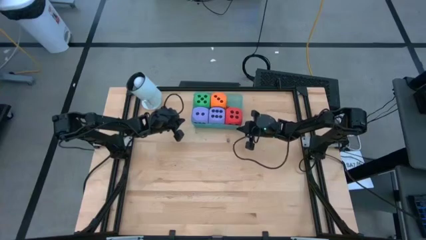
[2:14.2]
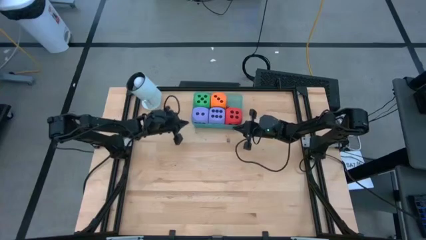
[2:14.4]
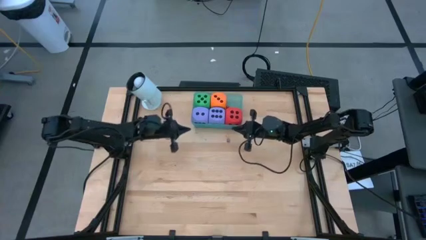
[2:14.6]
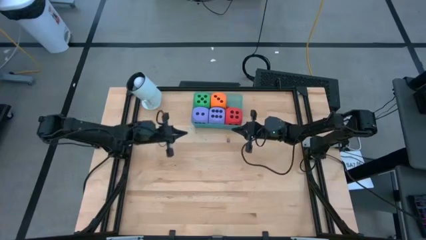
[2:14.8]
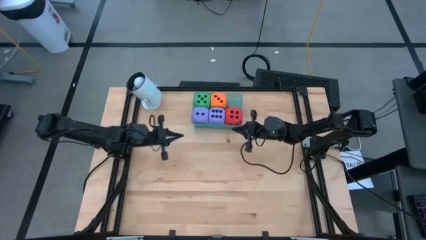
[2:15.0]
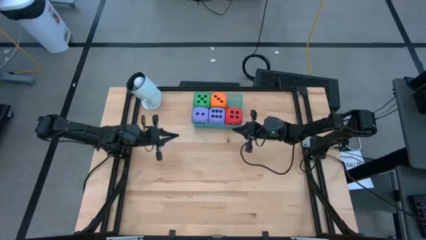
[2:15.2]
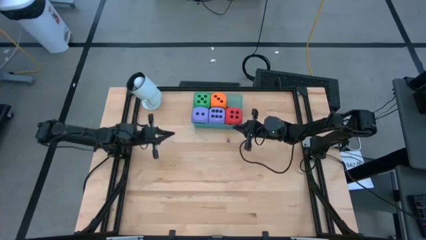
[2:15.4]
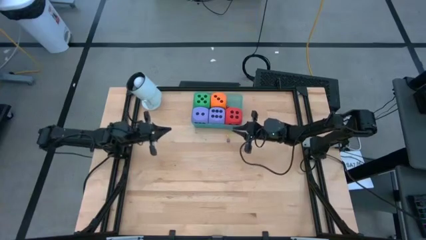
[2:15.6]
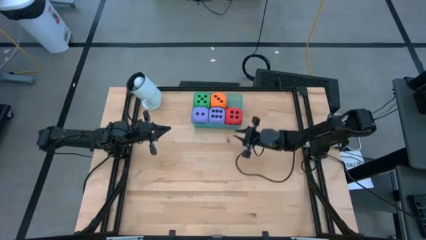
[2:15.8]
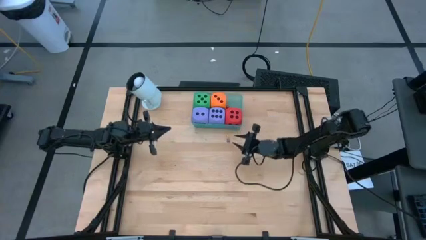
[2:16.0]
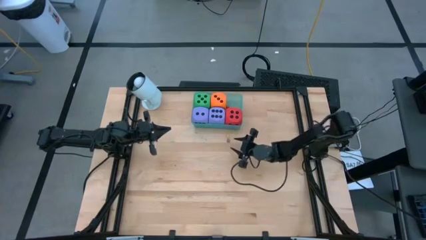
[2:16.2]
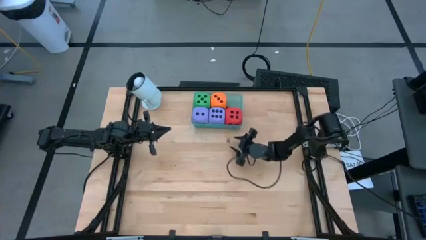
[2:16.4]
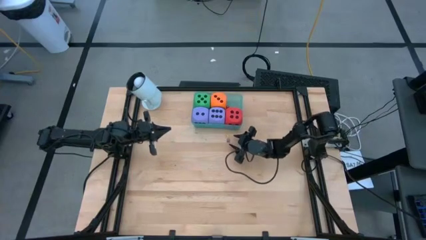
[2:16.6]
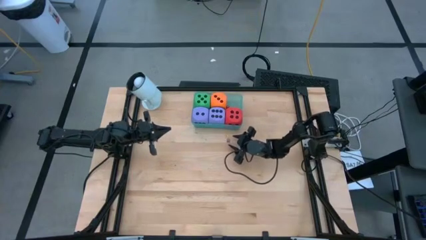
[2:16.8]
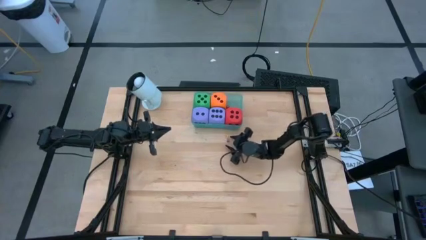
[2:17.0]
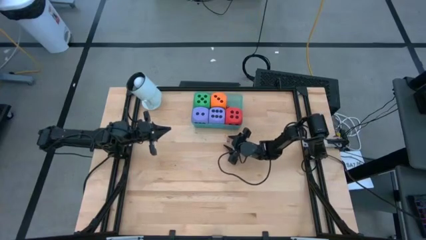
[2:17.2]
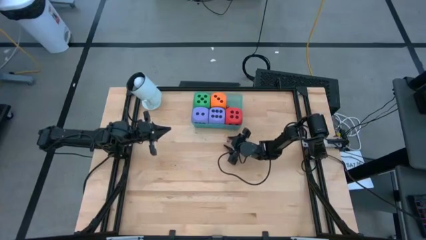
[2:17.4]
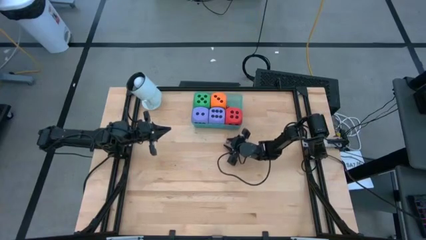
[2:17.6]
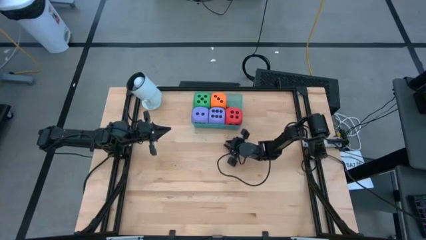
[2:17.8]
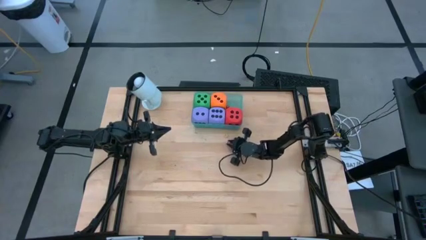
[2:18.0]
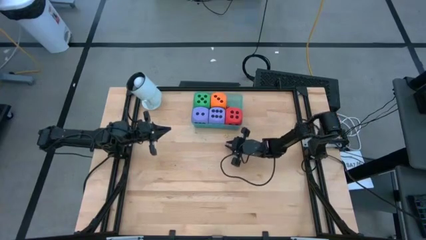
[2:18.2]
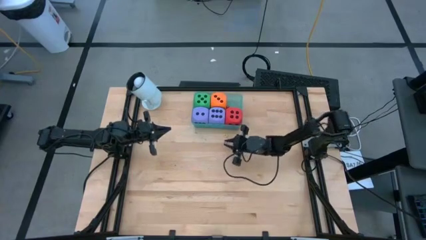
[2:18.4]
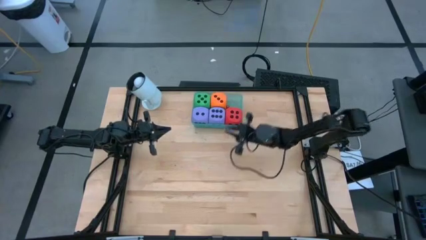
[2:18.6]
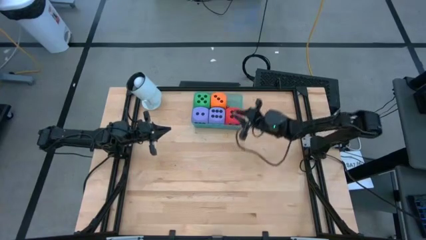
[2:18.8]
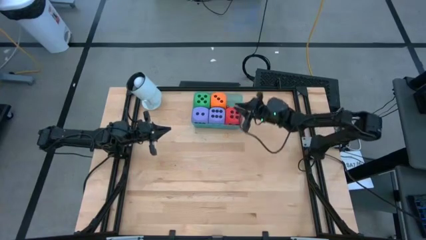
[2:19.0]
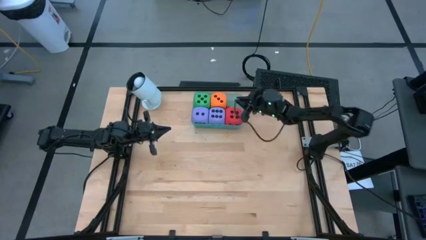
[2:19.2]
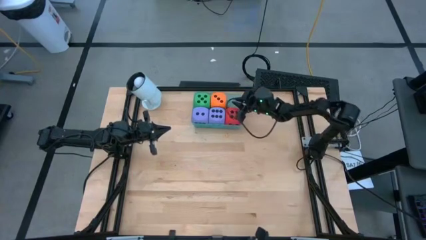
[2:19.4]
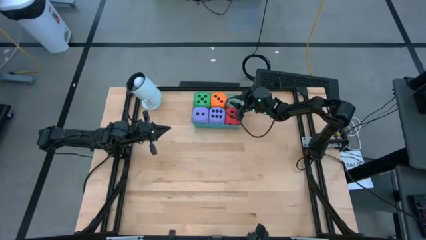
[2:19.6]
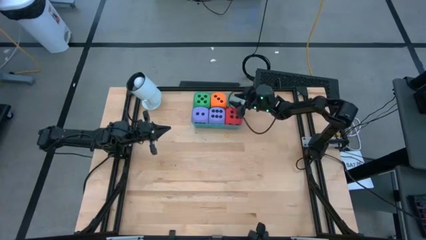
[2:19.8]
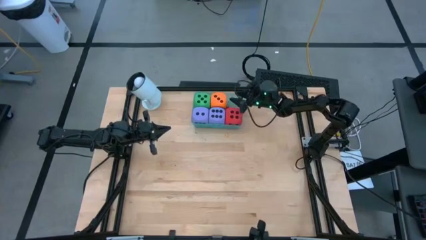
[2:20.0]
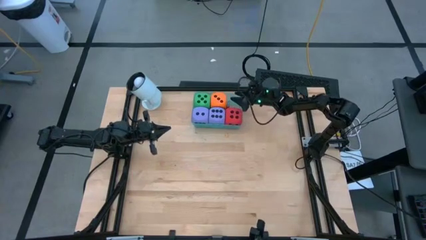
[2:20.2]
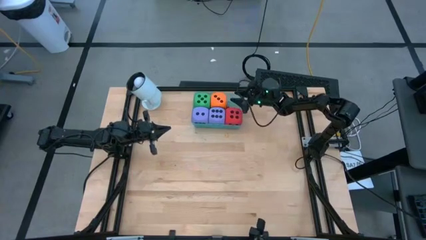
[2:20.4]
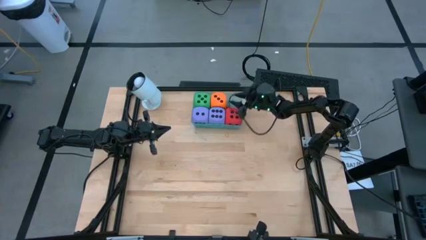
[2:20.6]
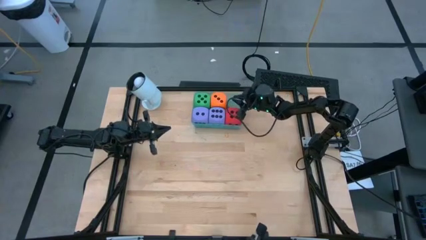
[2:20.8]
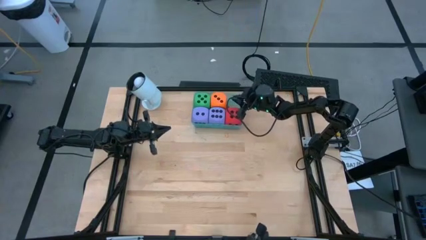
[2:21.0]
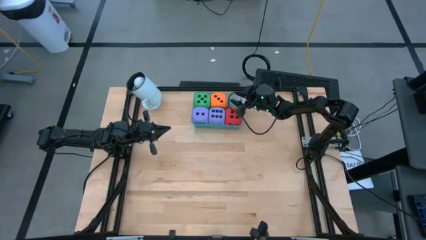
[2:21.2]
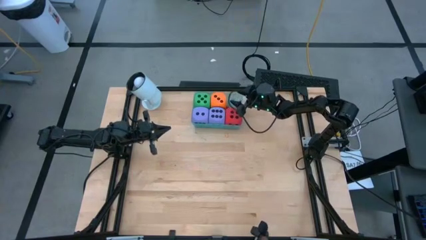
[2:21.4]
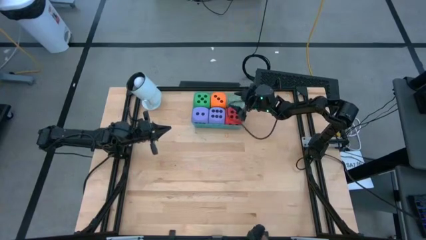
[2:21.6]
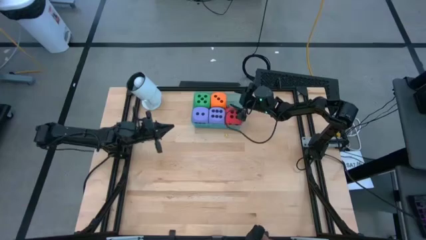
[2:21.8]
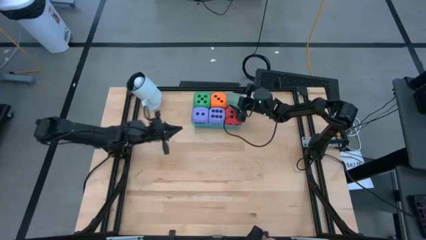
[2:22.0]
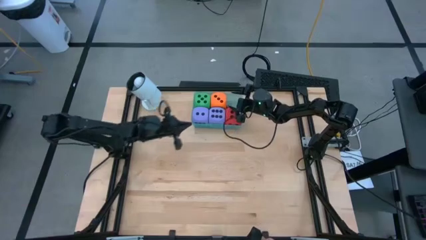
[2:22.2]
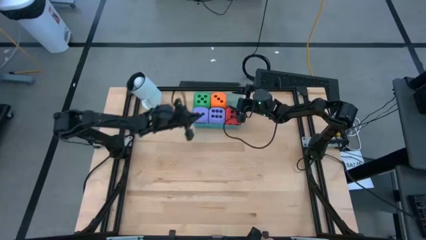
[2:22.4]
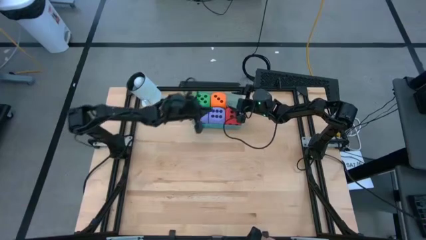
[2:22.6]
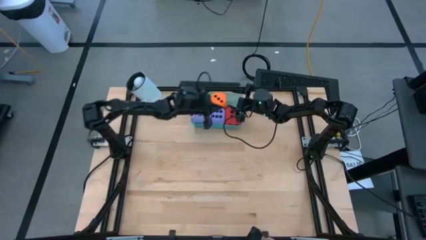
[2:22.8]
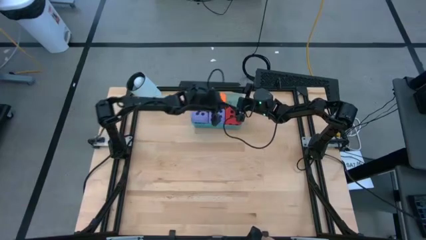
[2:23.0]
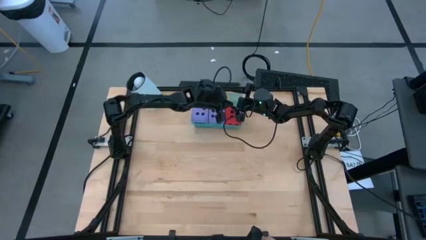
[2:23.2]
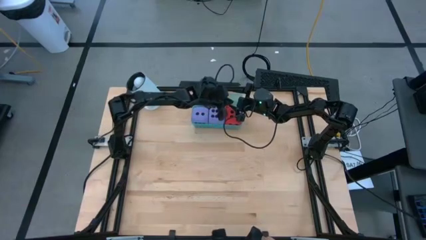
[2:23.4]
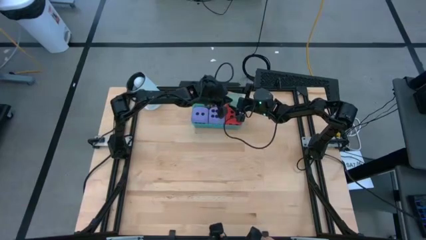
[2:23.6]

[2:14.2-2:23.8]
Task: Pick & Place Dice
Put the small purple dice into the green container

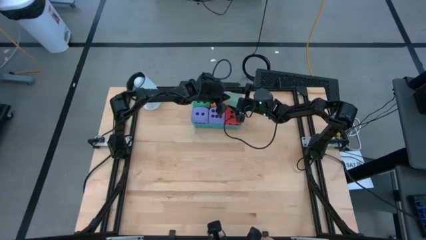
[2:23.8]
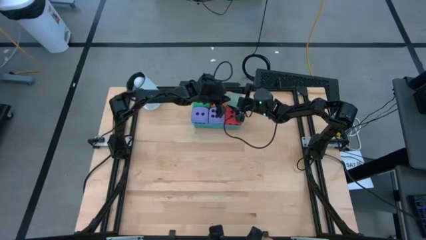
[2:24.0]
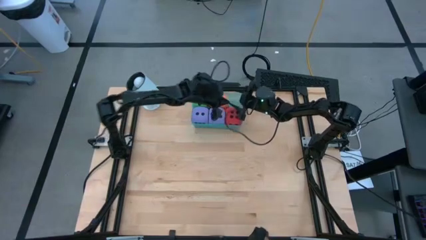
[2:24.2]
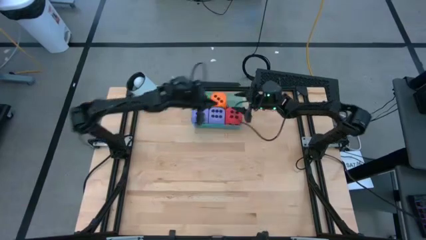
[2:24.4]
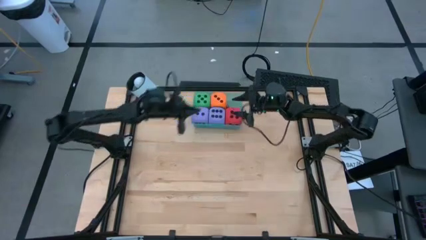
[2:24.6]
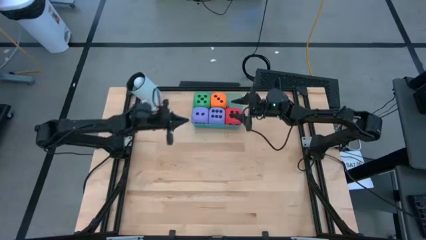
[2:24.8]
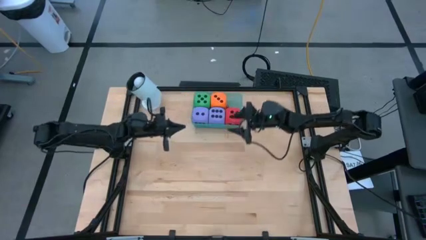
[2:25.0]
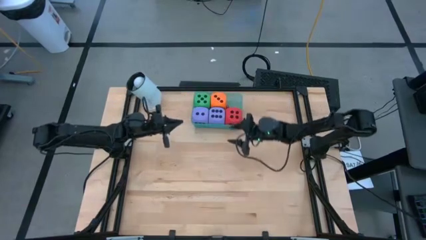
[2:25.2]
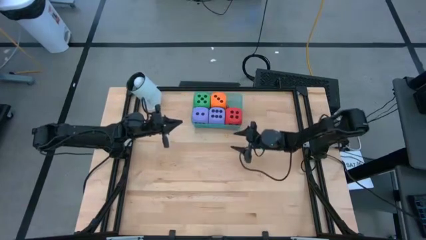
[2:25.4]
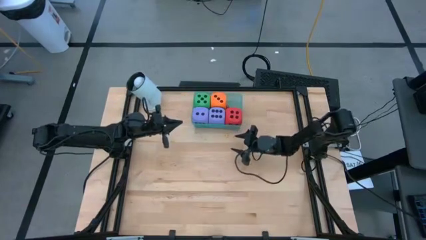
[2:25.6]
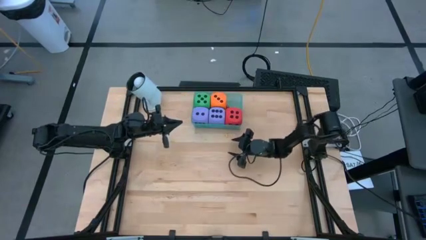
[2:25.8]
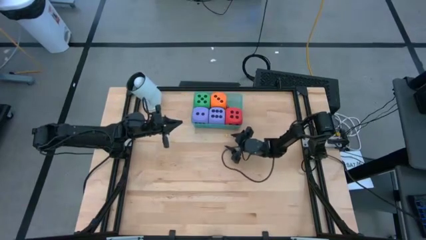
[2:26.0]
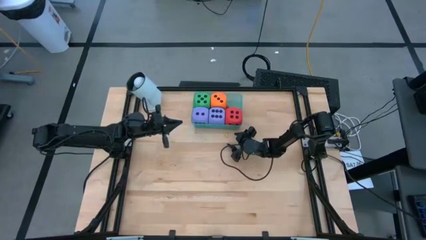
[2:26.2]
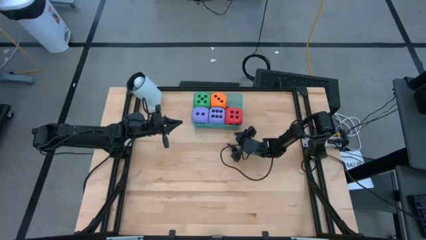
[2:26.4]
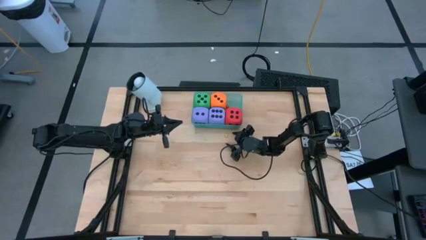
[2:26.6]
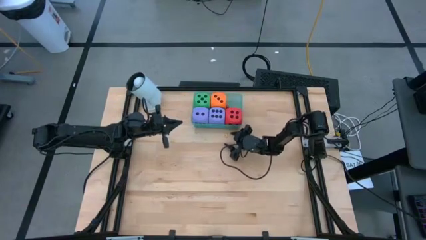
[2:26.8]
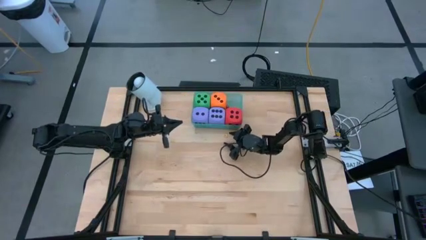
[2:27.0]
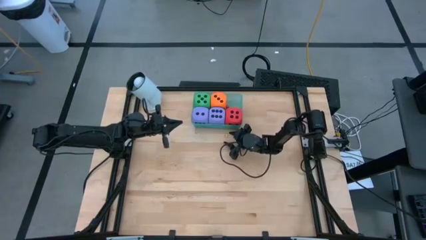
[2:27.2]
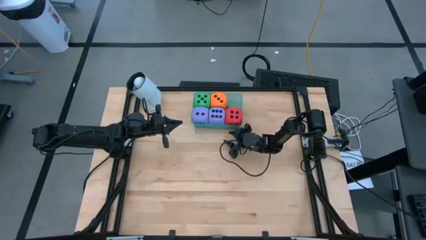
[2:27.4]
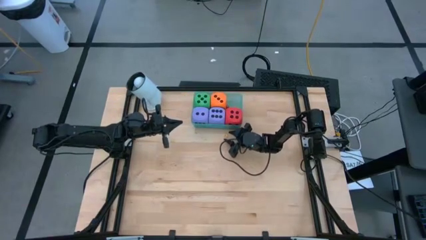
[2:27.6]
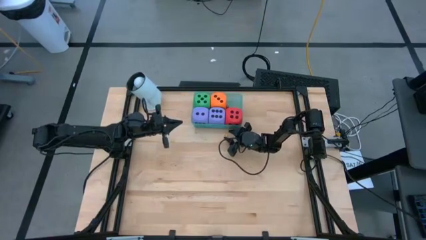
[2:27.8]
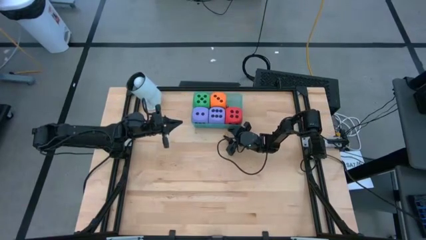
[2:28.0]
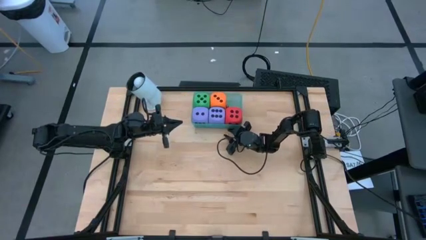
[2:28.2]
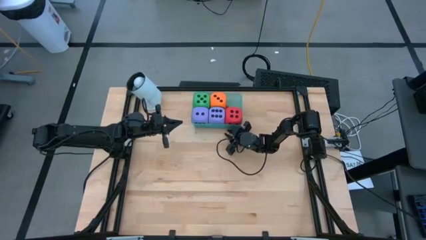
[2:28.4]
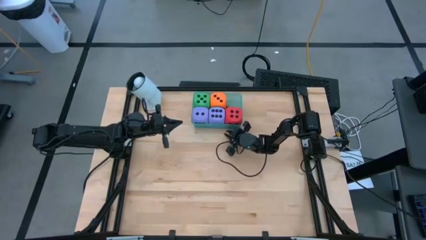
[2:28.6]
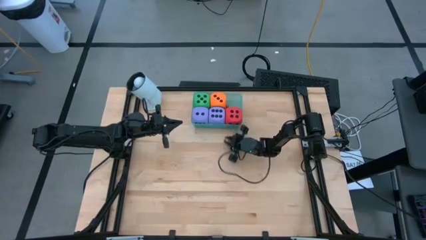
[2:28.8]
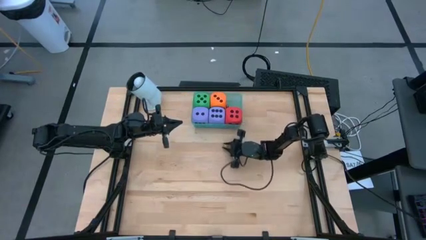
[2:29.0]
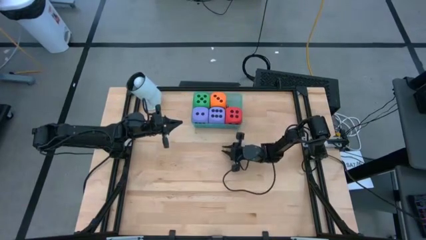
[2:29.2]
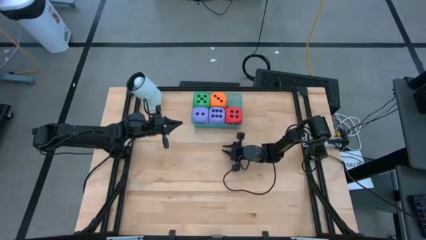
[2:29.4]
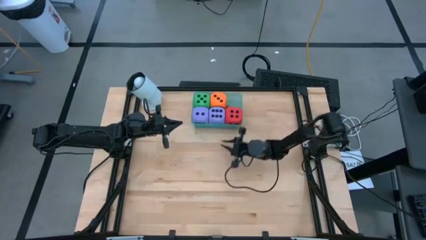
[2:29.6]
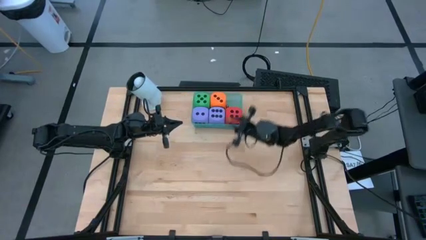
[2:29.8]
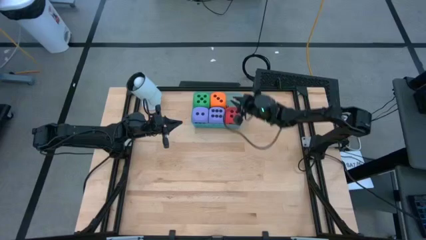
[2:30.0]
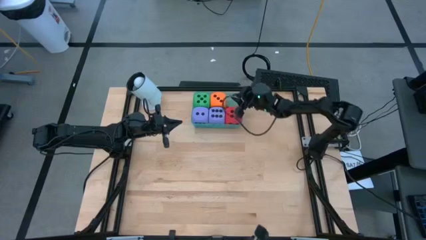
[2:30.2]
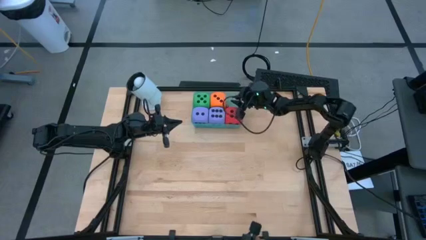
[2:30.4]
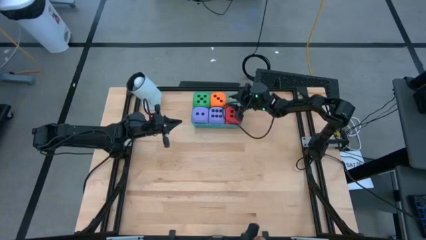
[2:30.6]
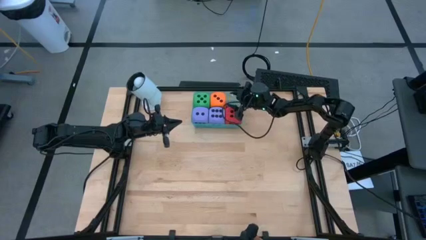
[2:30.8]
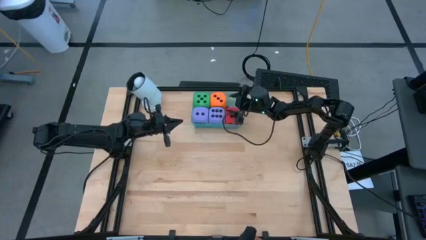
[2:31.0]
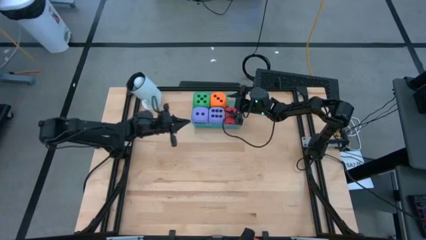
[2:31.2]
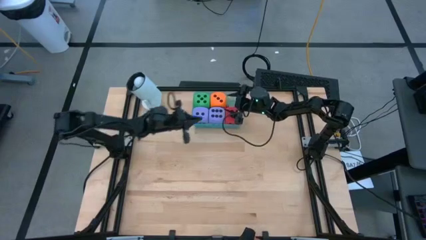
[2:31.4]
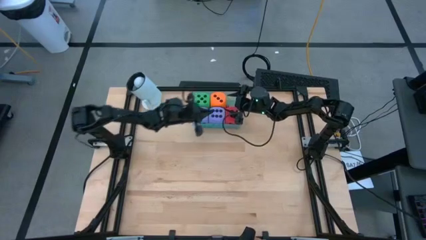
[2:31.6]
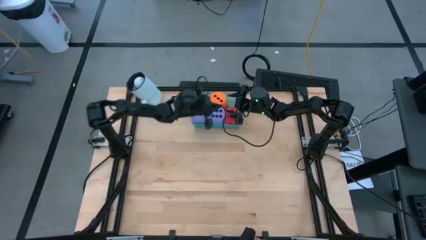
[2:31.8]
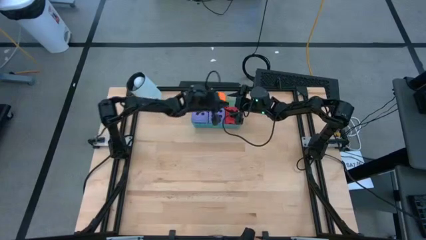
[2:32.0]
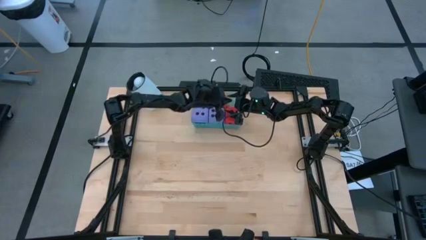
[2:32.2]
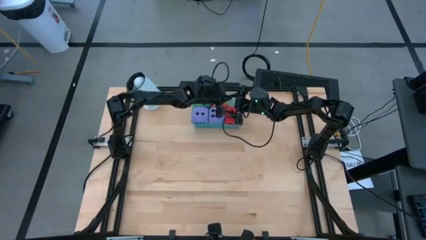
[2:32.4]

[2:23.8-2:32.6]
Put the small yellow dice into the green container
